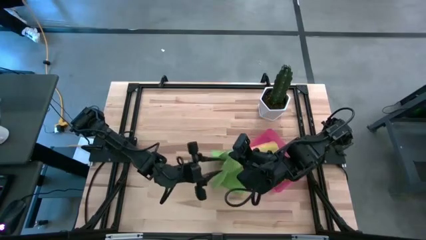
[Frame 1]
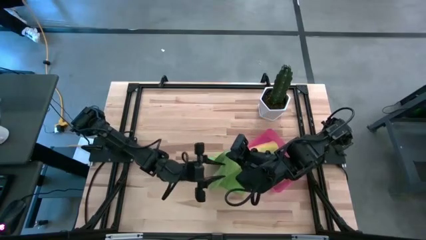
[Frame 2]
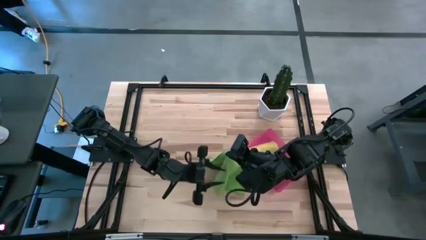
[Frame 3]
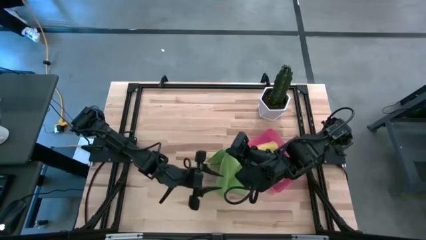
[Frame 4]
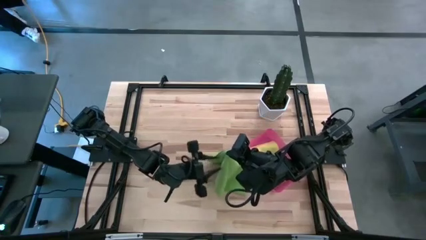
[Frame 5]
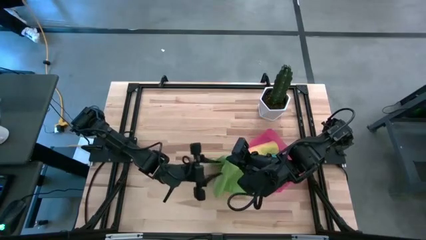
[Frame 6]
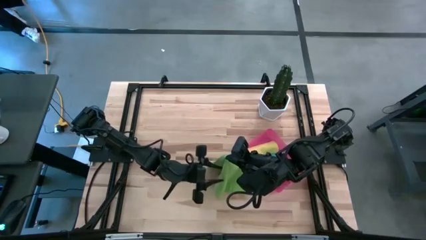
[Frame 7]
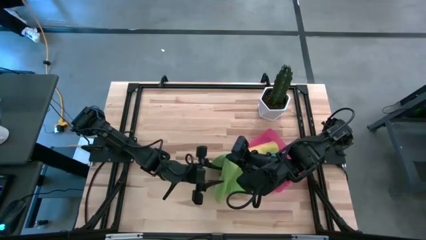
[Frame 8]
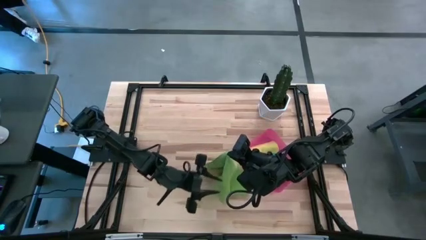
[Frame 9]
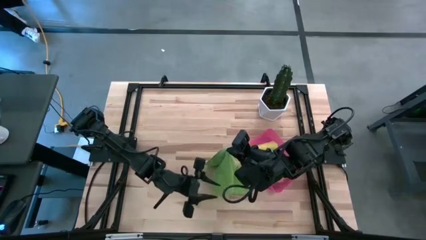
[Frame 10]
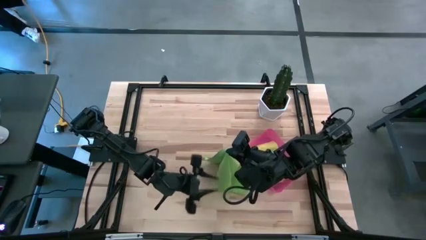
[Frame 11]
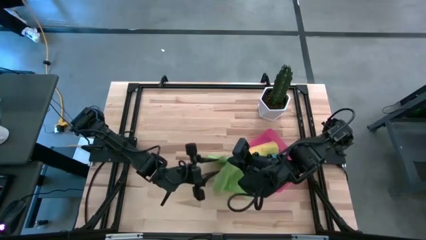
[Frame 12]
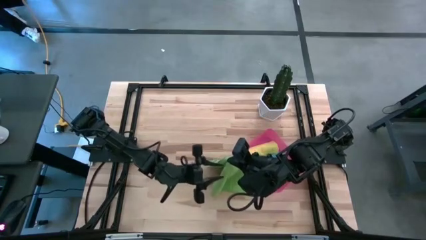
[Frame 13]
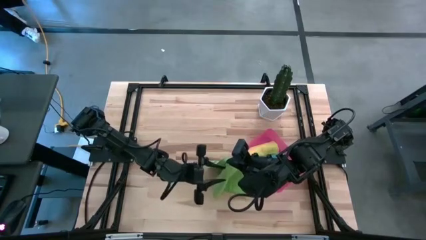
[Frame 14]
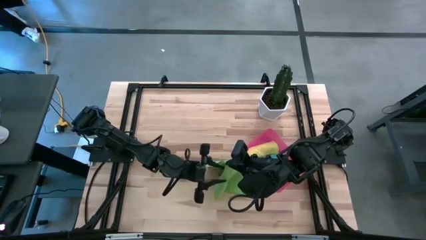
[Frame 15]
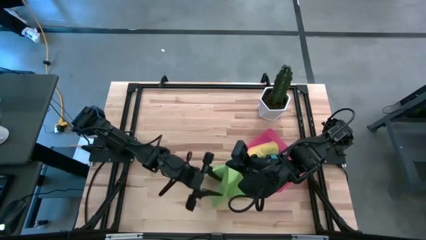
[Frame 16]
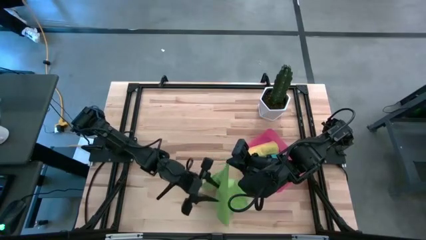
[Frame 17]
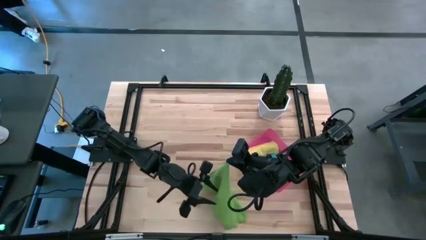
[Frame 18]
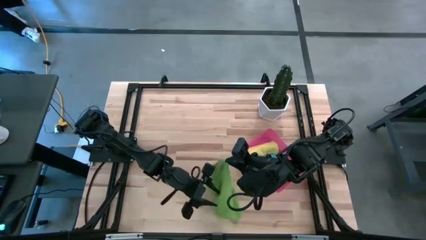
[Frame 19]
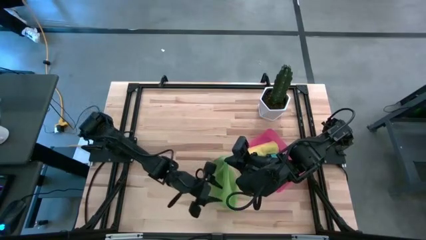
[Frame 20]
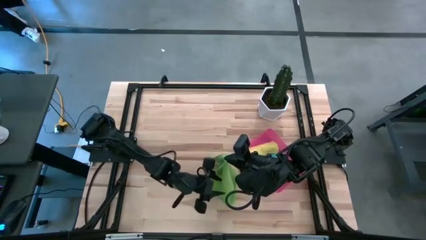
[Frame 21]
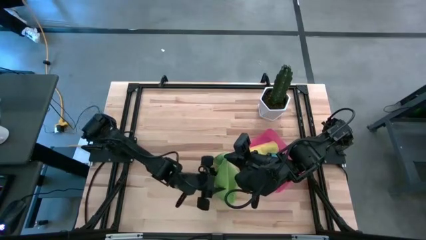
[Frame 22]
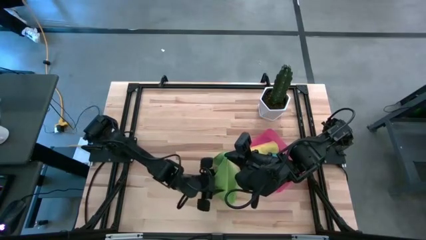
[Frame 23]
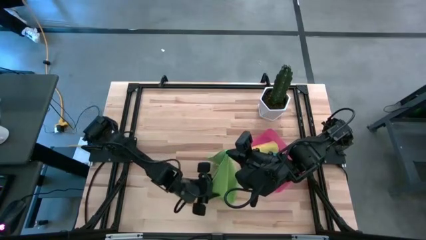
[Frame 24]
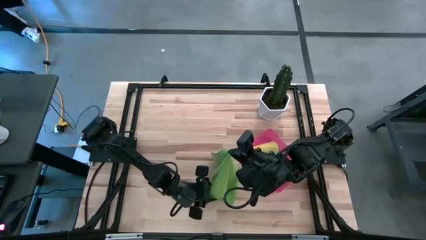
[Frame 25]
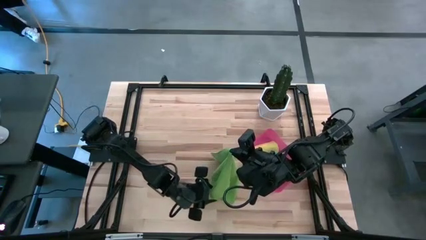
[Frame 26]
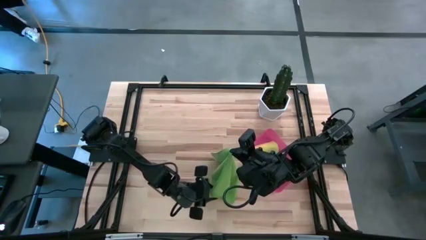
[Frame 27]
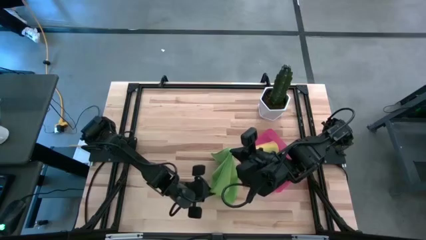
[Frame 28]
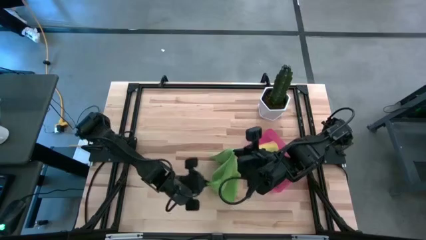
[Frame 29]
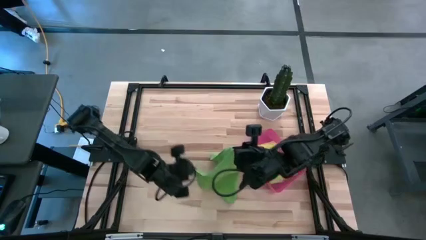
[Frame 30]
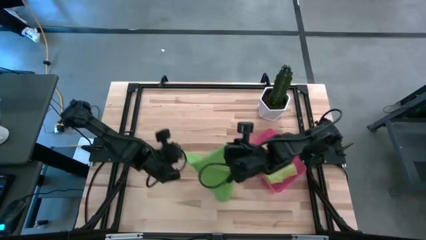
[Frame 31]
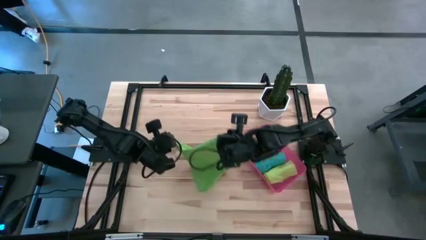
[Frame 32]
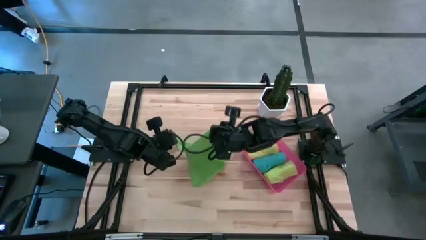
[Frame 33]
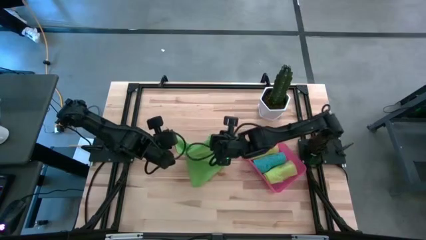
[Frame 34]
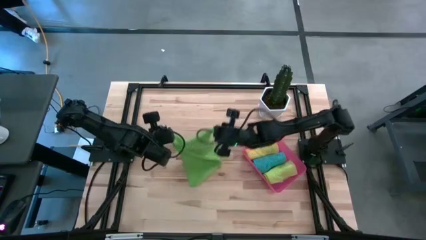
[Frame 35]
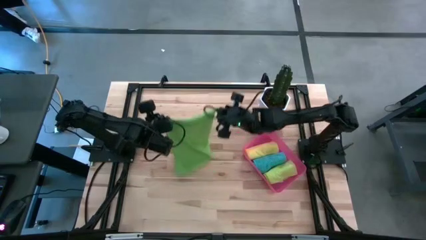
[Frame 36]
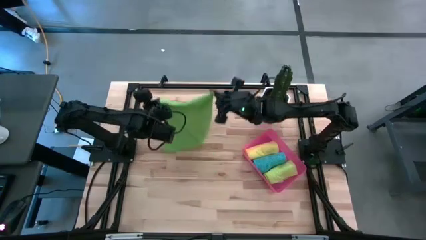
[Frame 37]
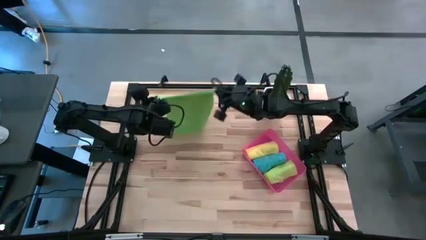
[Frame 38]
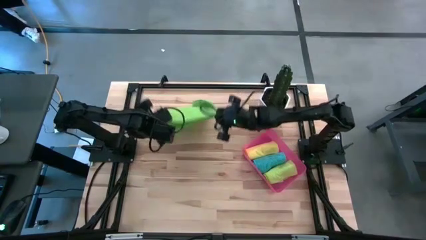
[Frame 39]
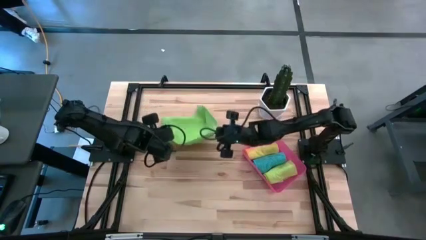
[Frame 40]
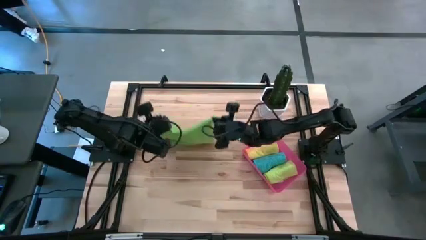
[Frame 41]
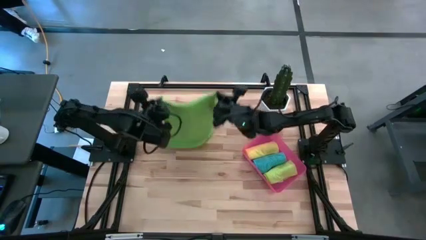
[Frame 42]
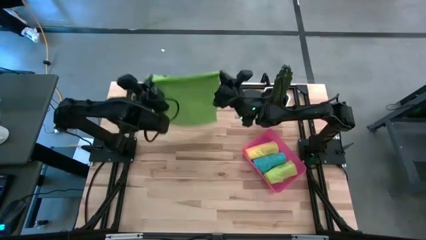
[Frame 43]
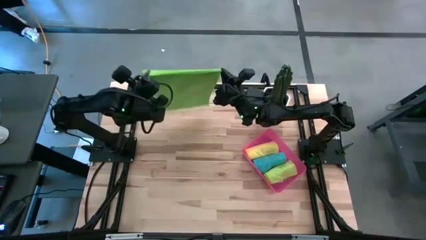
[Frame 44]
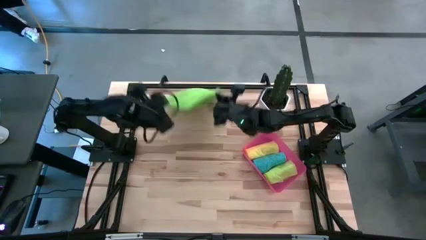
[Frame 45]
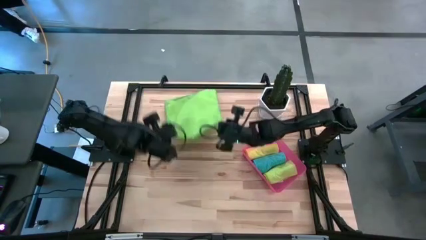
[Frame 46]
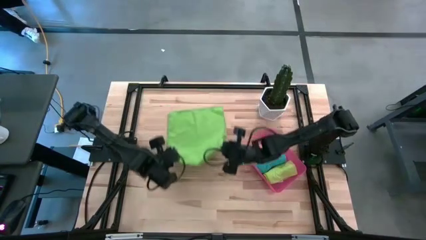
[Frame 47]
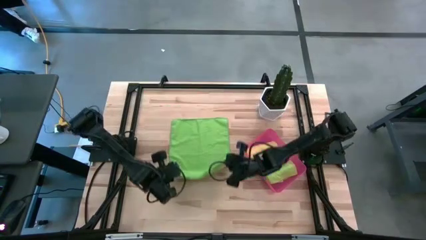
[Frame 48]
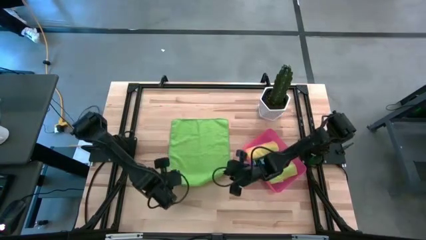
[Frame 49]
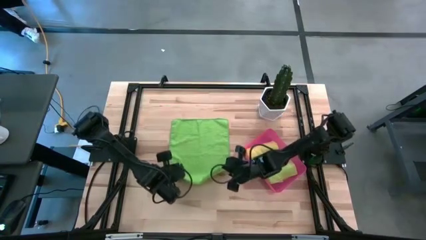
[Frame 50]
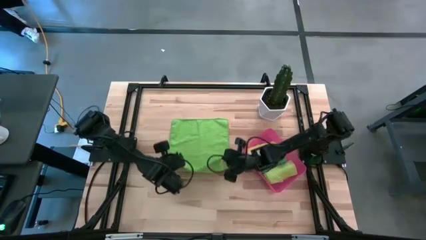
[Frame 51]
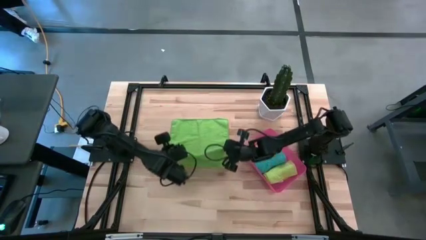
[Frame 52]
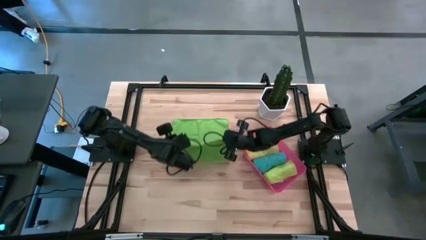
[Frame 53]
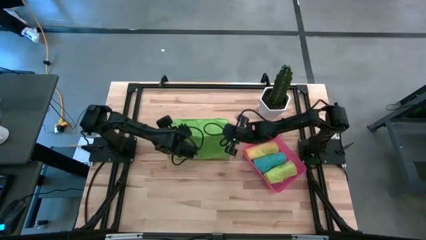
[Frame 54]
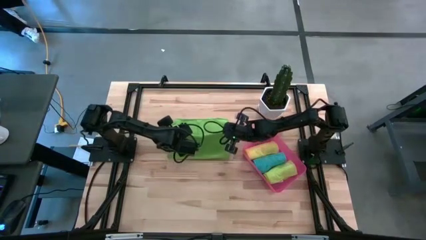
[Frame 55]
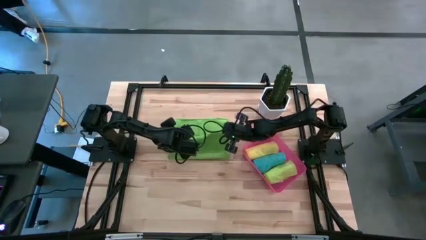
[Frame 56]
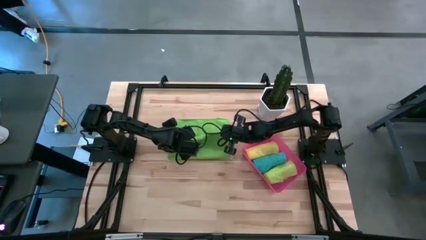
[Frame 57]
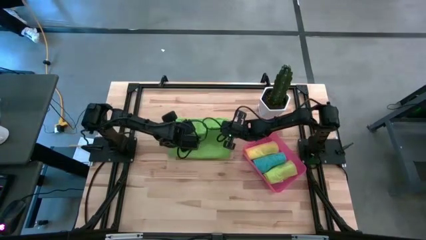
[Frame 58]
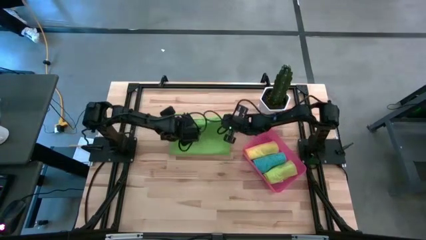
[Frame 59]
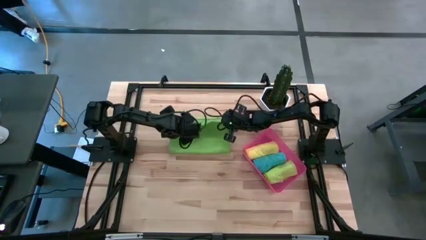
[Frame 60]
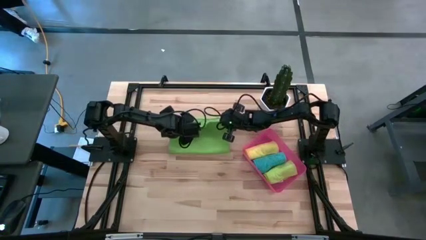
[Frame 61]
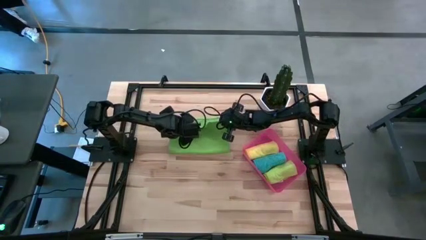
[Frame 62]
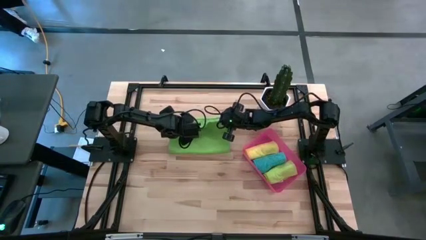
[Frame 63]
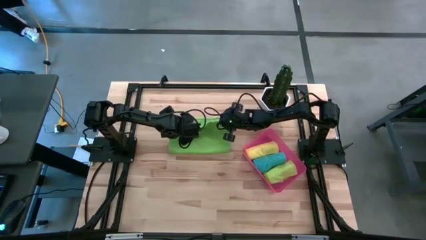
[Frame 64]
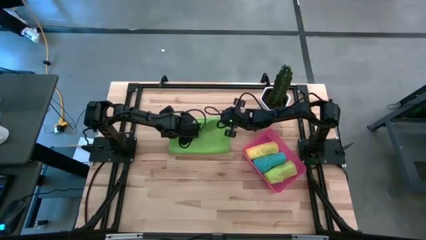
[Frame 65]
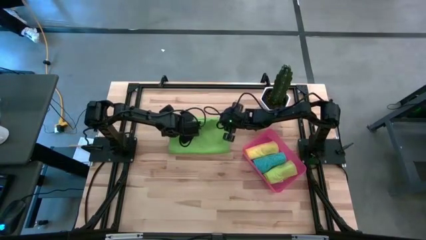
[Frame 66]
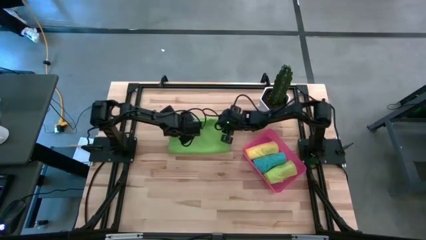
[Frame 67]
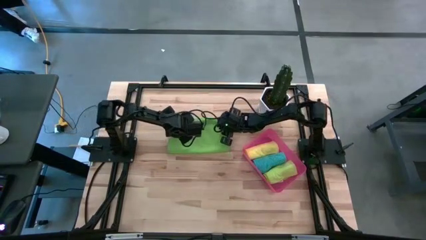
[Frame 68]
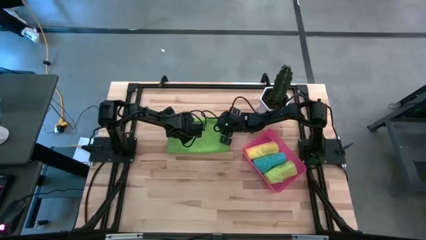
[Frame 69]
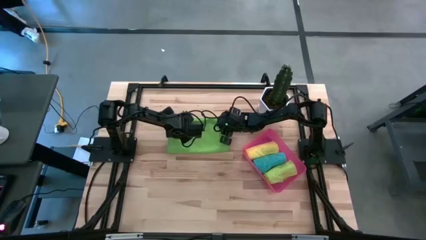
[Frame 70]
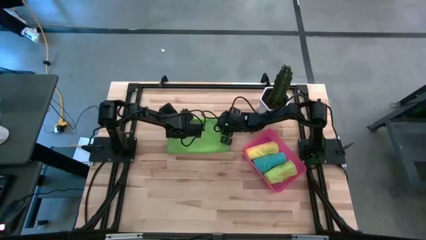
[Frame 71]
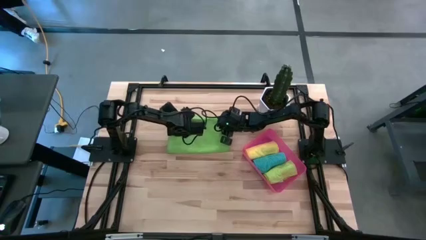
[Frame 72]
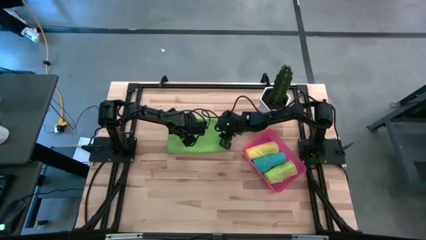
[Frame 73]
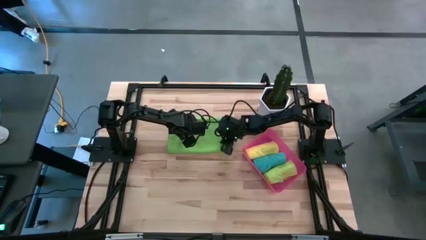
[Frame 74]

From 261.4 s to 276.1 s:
Task: Roll microfiber towels into tight, uniform cylinder then place into a basket
Fold the green microfiber towel
